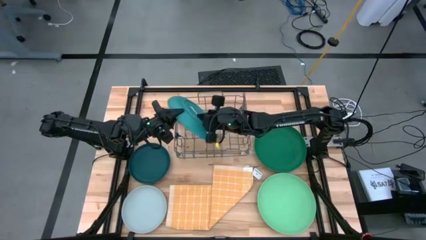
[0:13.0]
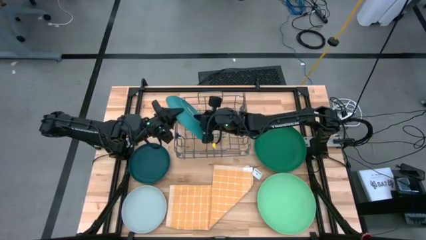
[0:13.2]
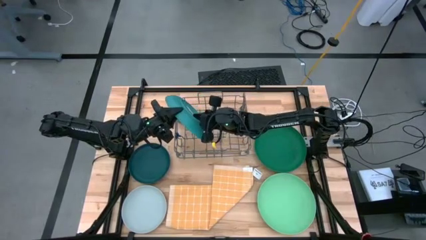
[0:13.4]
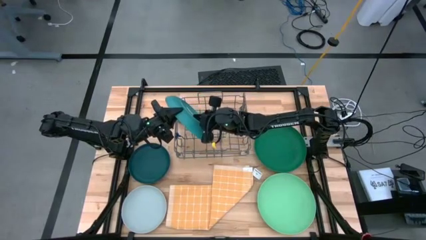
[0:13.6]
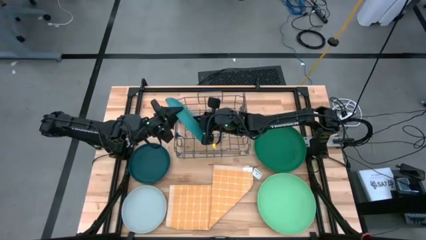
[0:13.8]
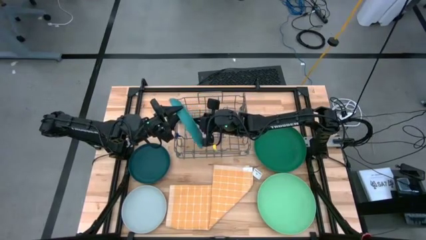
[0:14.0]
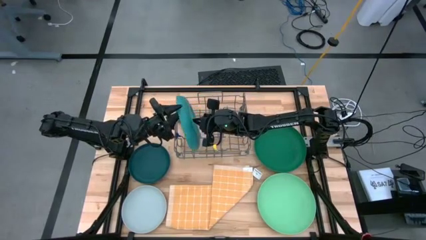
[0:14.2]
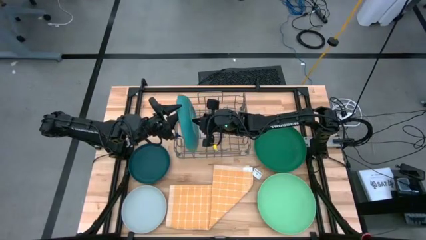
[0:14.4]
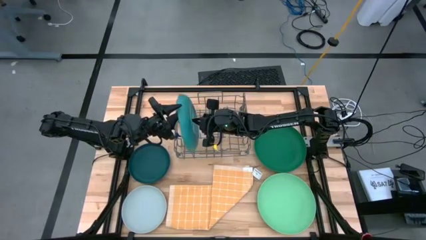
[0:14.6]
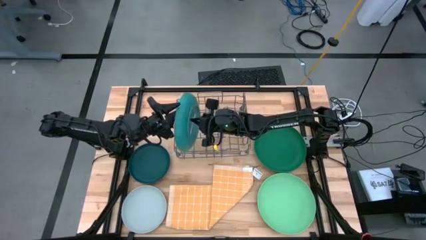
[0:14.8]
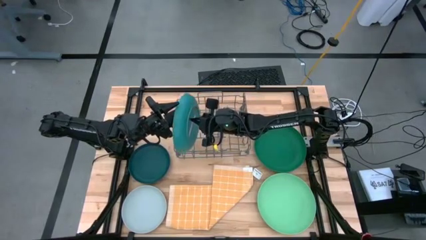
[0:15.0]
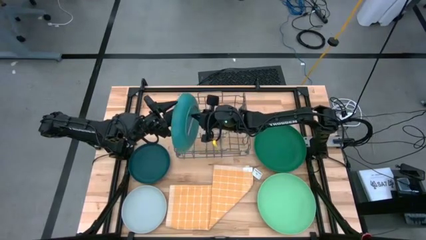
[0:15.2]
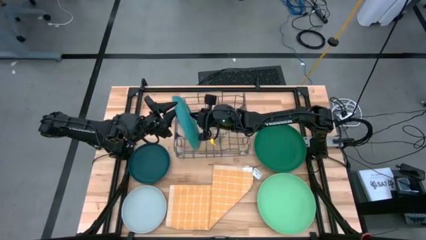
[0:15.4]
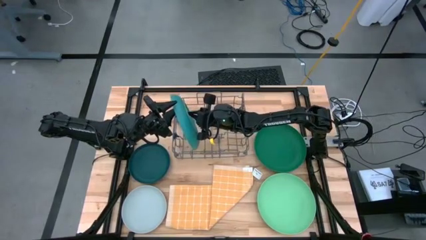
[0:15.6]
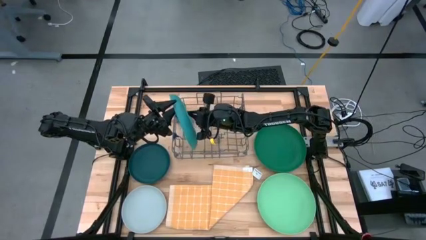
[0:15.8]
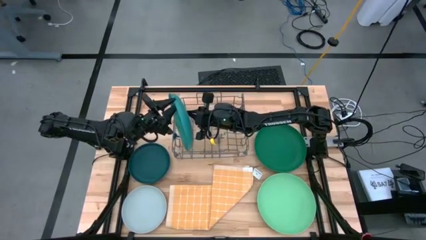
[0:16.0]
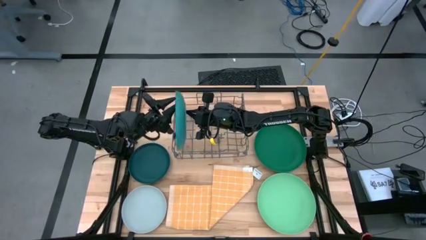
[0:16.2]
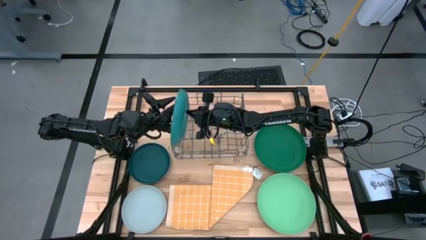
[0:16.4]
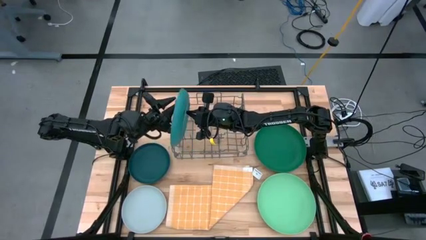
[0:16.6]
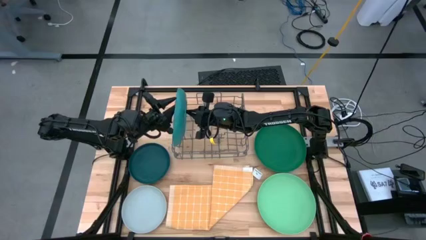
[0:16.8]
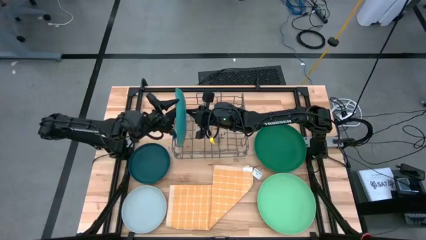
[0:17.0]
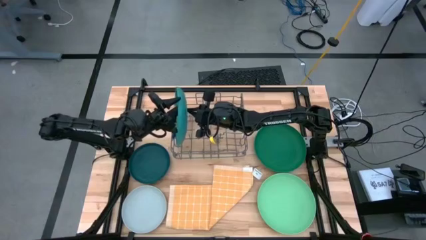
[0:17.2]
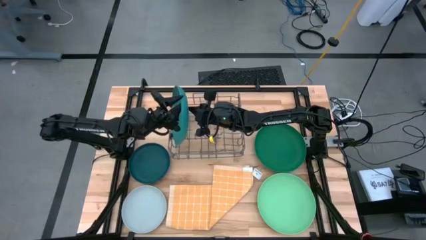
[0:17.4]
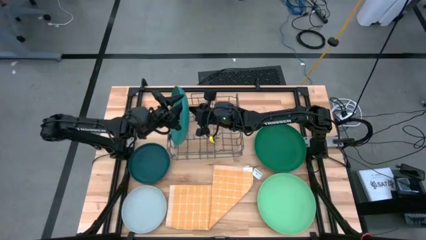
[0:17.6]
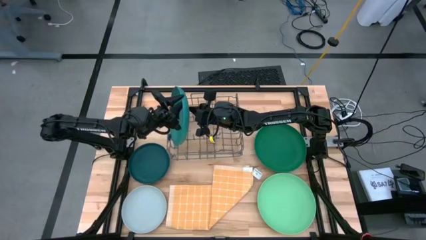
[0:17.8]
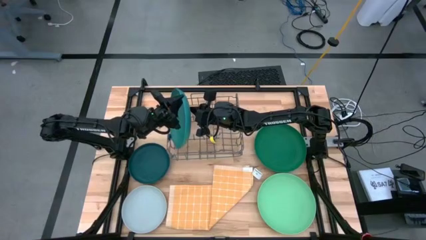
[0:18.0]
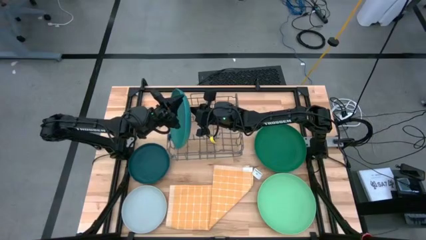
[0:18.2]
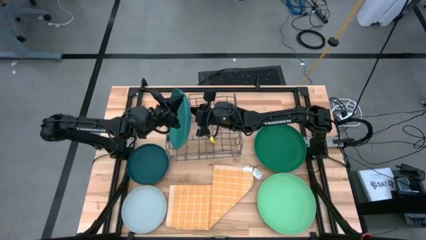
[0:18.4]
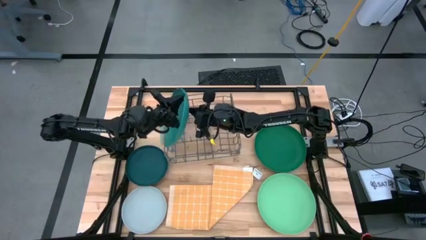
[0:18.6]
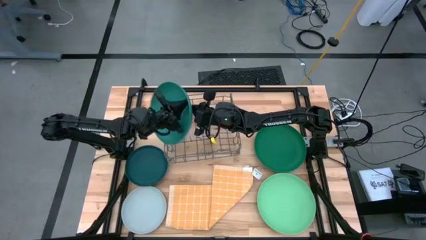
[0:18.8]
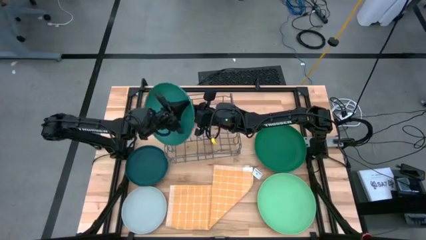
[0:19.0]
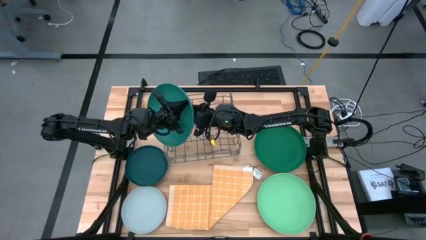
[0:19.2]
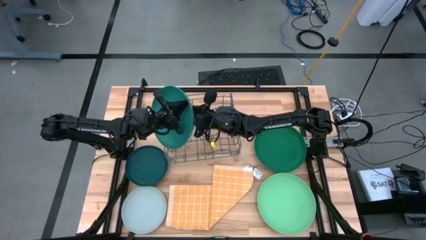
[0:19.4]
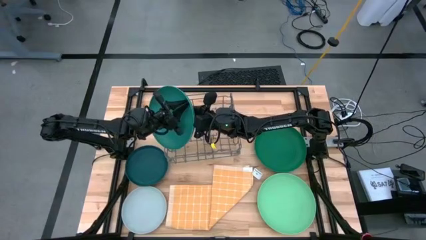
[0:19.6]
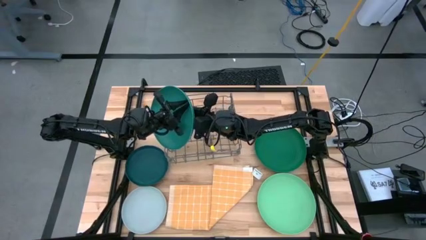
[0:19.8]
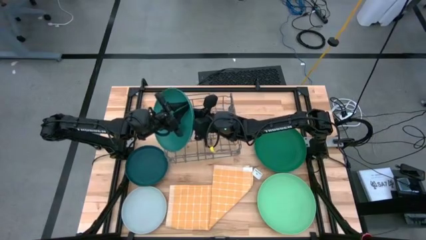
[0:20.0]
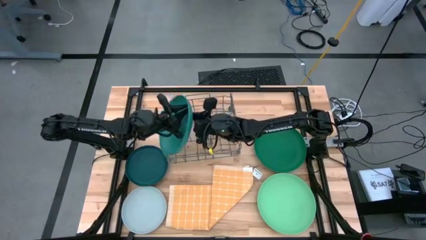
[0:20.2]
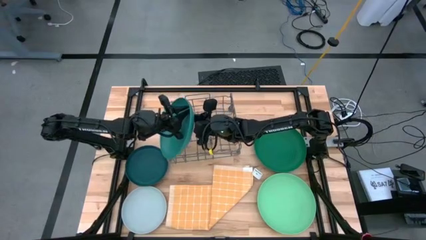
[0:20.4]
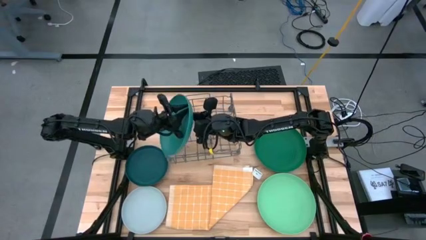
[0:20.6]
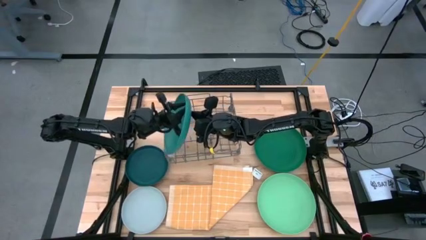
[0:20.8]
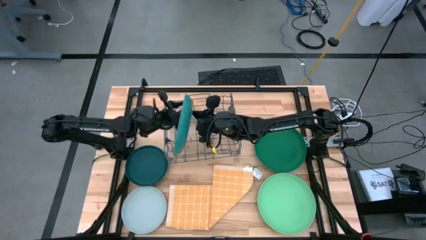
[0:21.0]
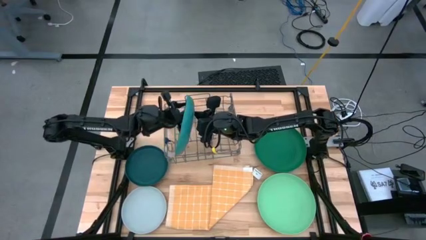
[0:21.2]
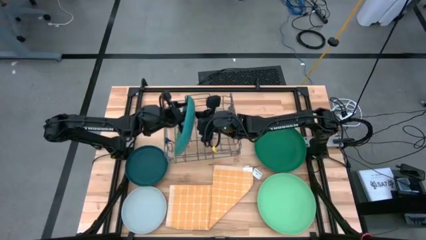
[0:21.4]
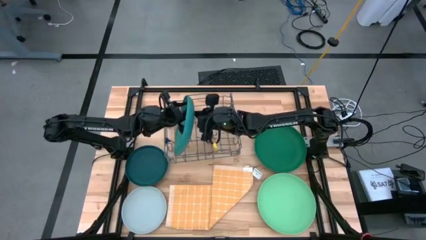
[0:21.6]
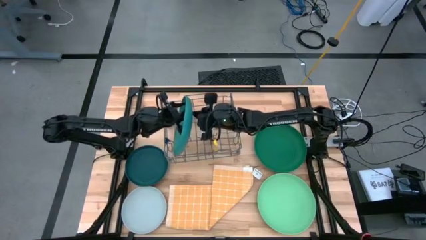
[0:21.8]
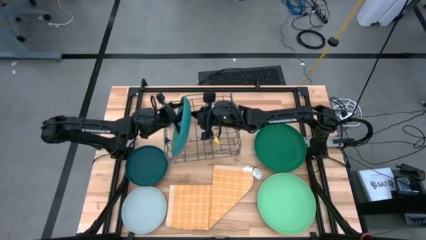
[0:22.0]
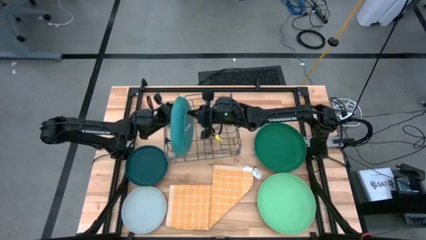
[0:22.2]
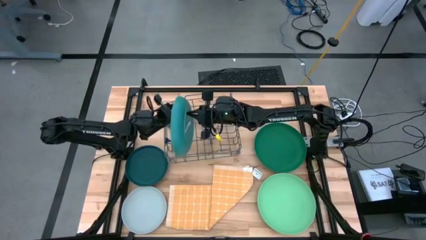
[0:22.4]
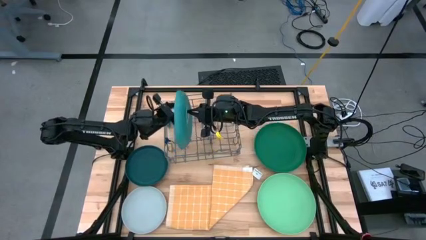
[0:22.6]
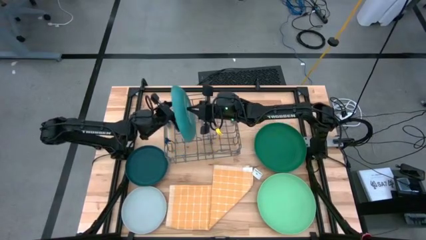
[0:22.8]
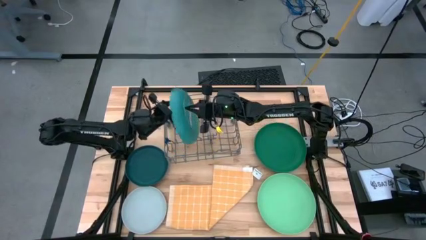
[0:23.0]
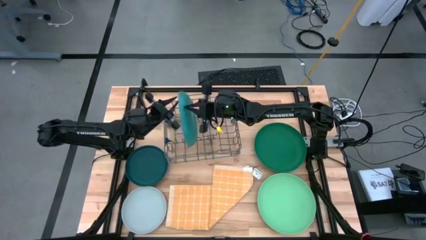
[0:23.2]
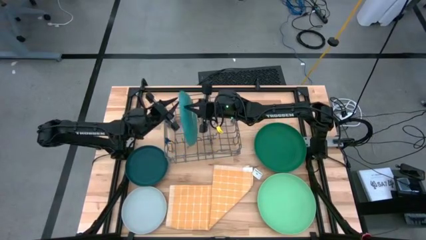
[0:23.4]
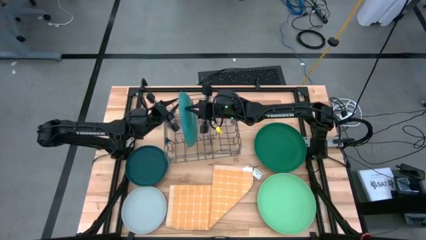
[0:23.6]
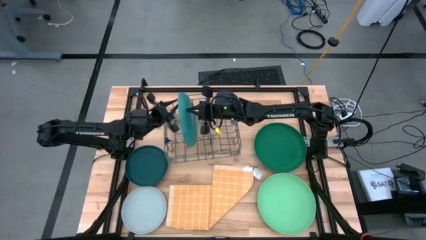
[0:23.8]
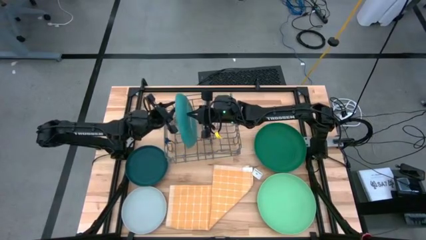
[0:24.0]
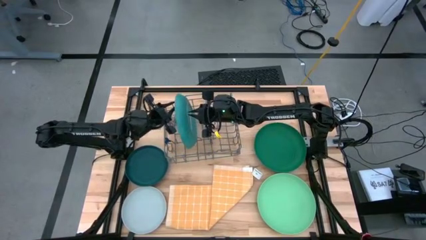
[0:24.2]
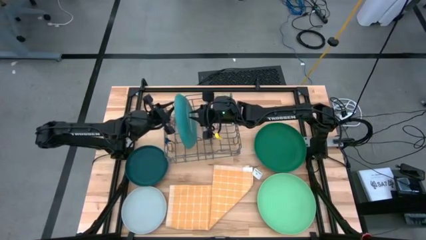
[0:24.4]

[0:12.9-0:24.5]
Task: Sort dishes
Put the blue plate on the dish rack

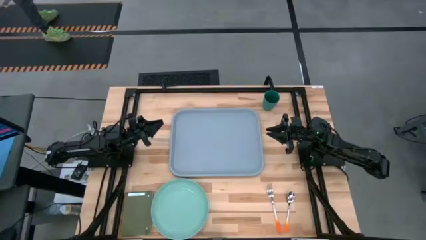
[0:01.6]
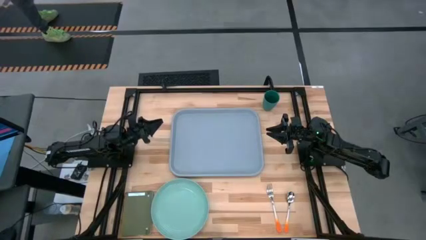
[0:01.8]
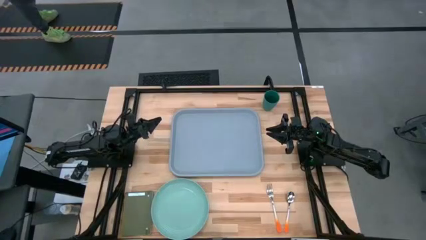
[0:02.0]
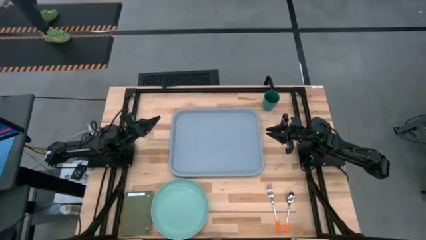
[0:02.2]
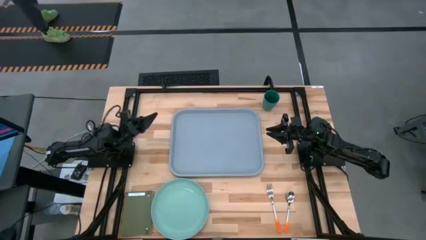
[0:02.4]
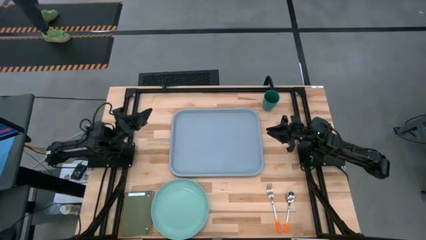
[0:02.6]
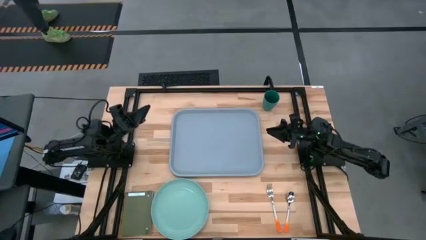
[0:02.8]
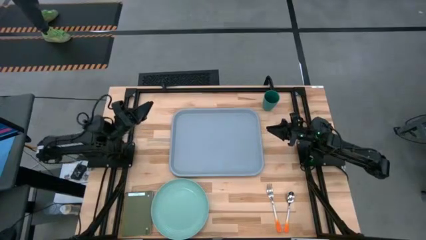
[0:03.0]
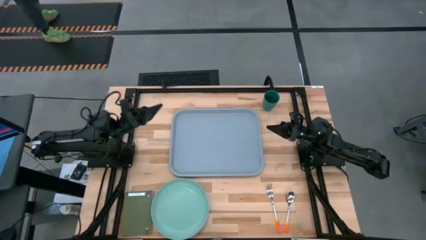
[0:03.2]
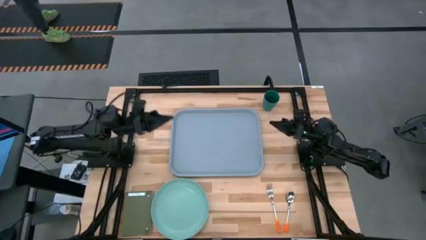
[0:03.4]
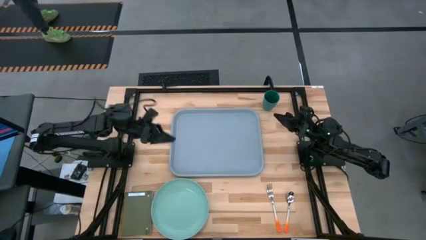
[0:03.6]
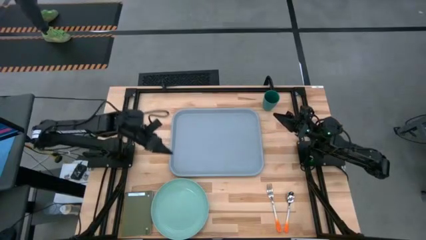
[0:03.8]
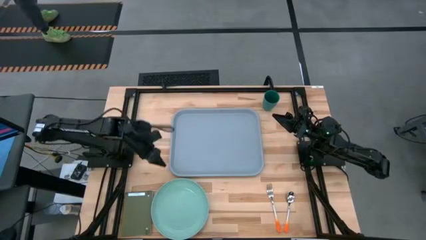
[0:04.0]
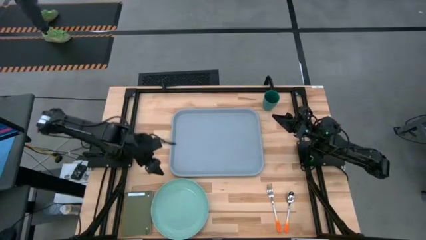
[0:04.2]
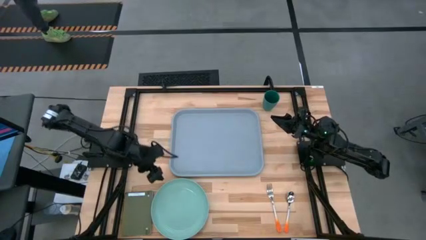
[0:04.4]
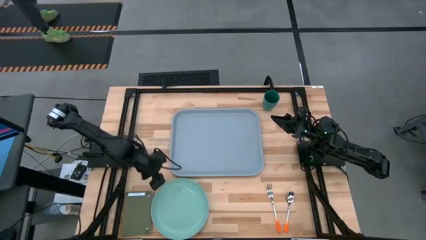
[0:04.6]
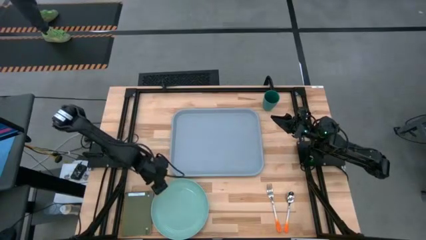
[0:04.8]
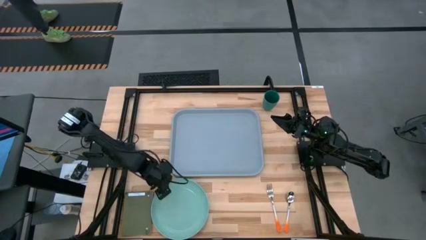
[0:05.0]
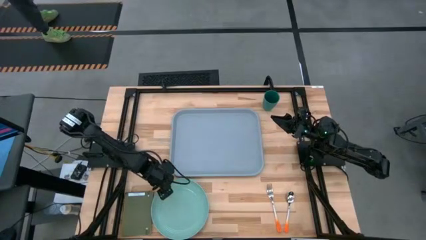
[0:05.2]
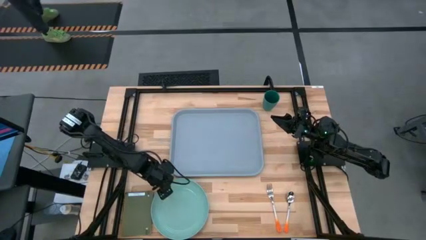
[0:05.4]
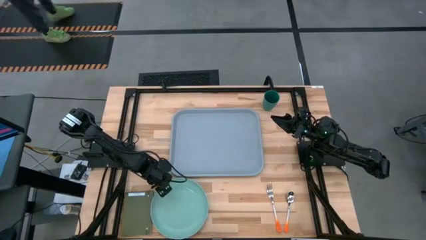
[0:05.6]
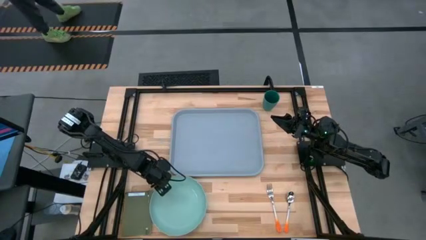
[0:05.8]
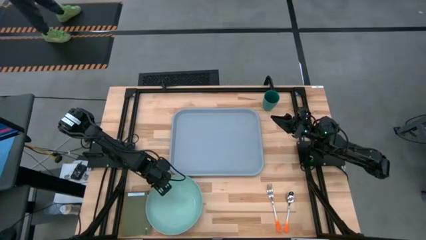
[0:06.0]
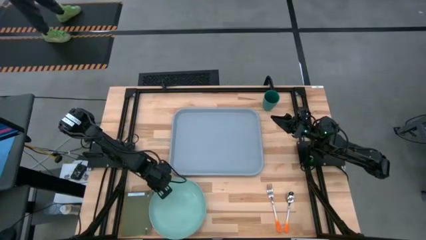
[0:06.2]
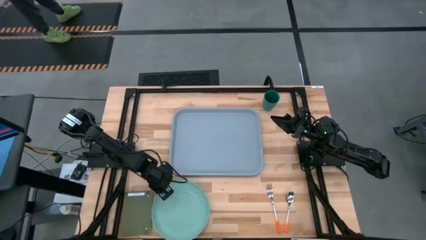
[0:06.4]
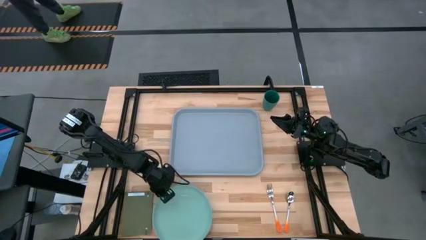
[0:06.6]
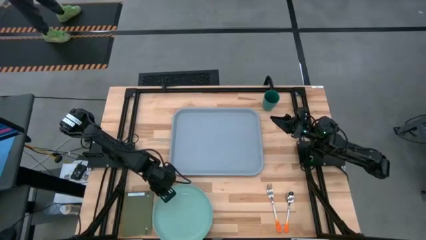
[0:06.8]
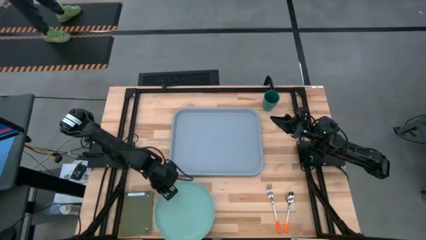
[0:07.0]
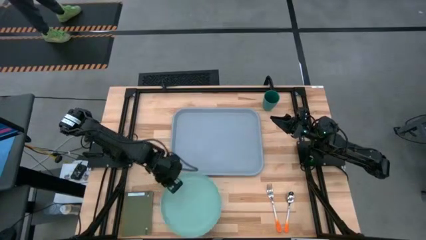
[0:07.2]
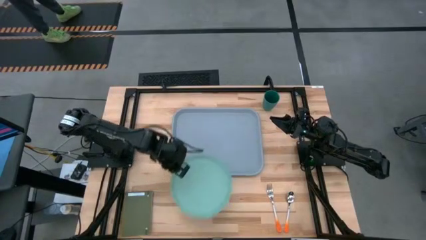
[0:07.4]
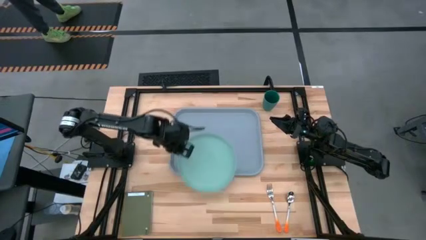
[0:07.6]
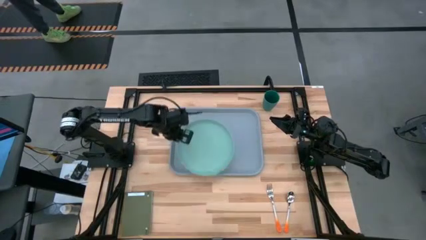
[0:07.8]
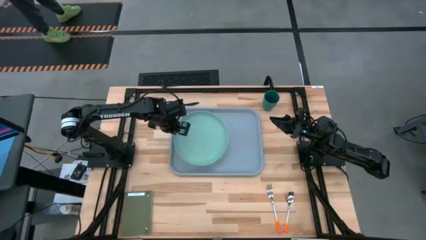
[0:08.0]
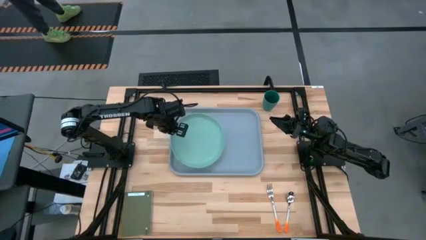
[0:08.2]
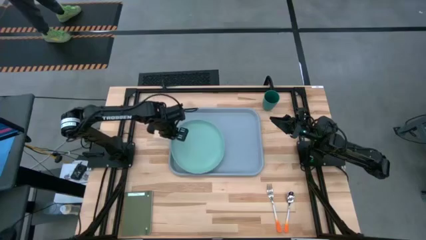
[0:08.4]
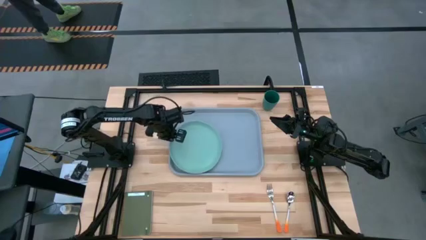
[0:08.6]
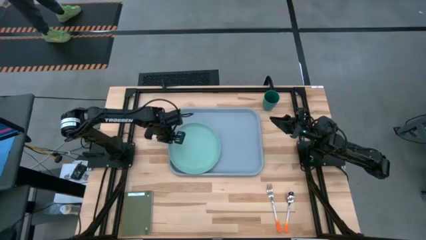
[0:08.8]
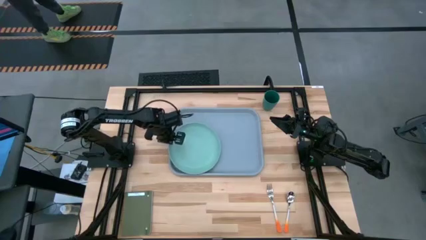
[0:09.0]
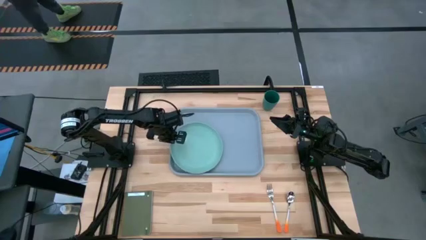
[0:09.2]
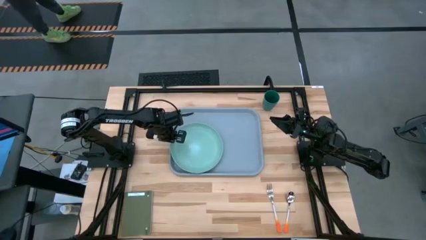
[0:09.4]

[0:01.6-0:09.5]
Task: Pick and place plate/cup/fork/spoon on tray
Put the light green plate on the gray tray
